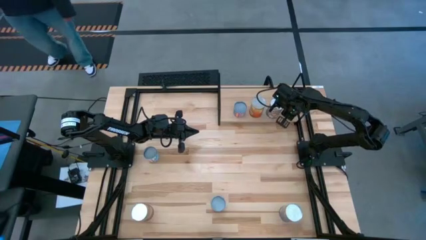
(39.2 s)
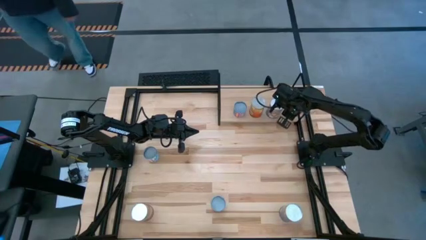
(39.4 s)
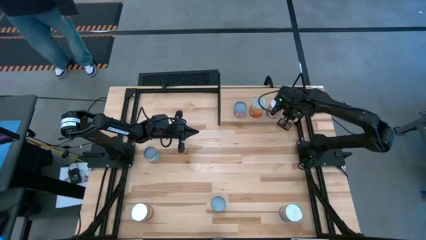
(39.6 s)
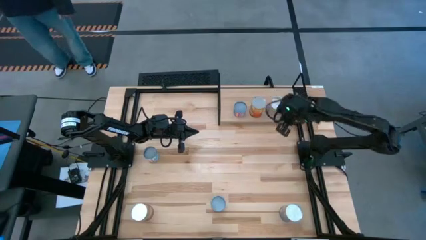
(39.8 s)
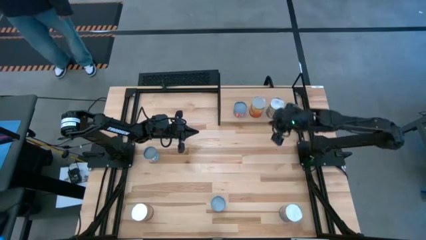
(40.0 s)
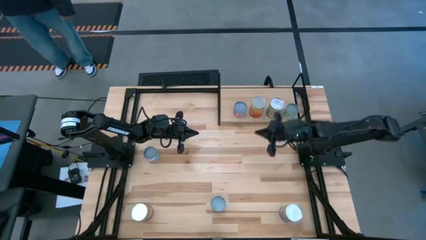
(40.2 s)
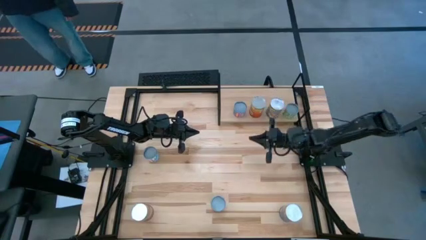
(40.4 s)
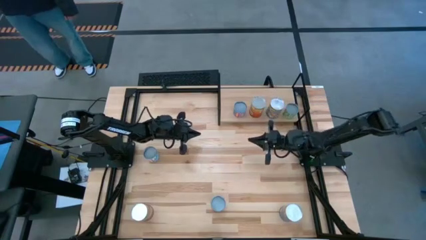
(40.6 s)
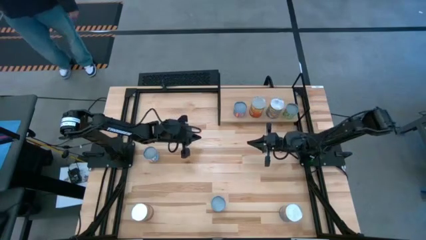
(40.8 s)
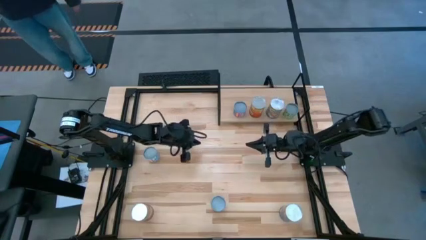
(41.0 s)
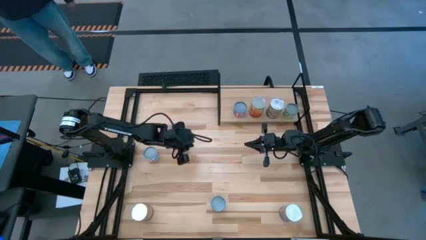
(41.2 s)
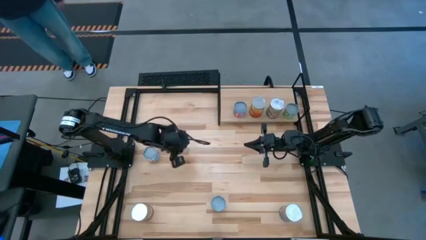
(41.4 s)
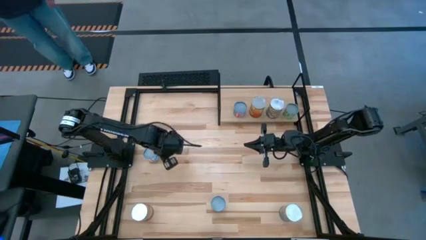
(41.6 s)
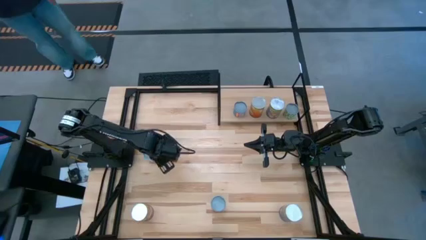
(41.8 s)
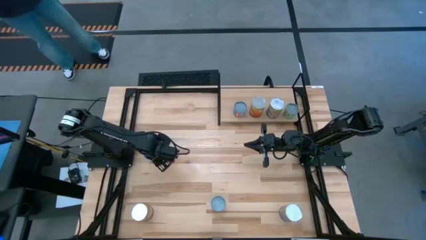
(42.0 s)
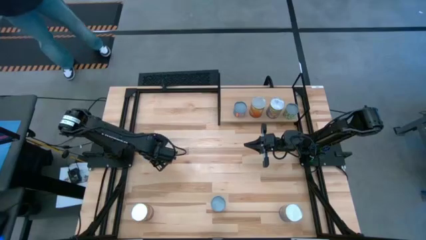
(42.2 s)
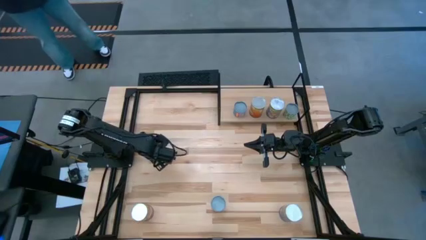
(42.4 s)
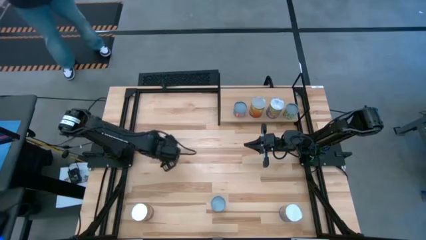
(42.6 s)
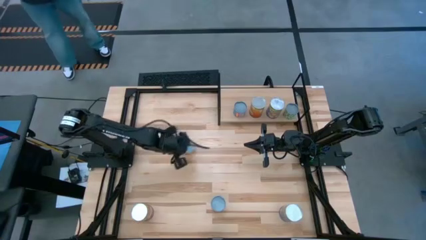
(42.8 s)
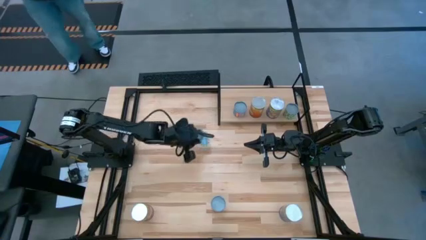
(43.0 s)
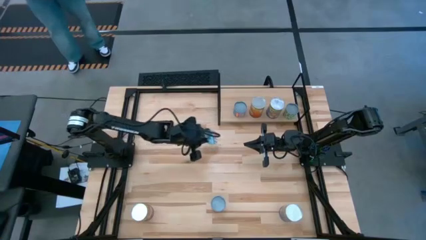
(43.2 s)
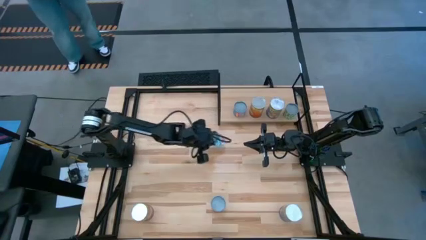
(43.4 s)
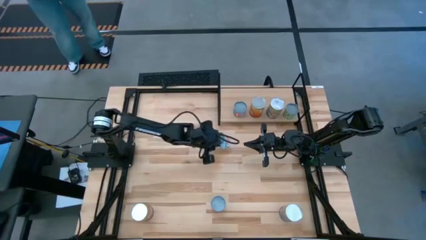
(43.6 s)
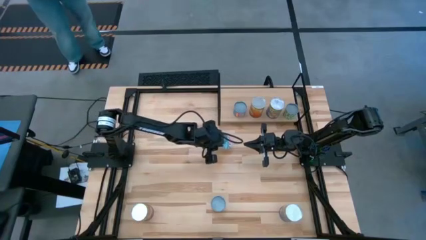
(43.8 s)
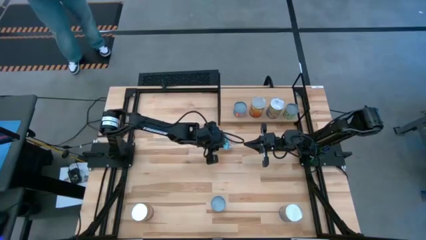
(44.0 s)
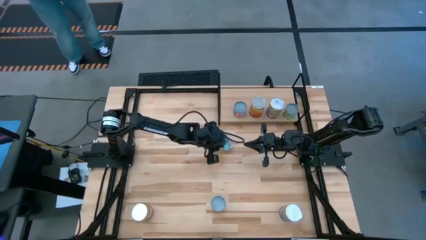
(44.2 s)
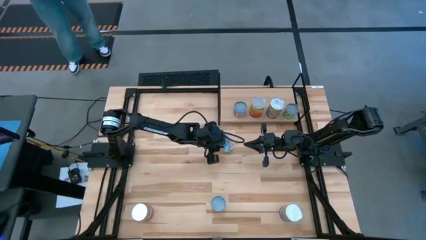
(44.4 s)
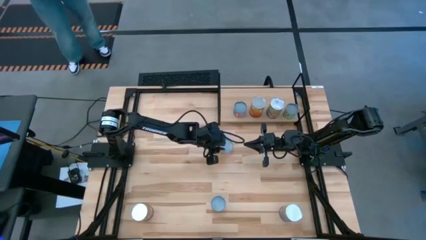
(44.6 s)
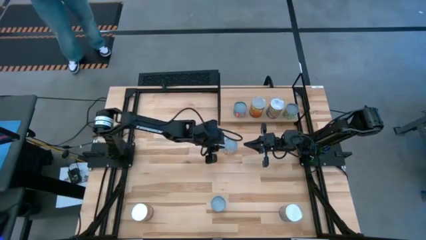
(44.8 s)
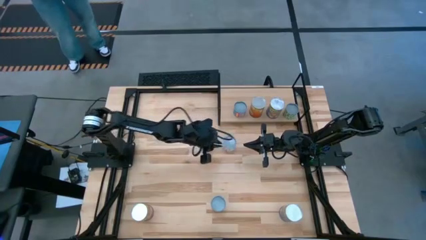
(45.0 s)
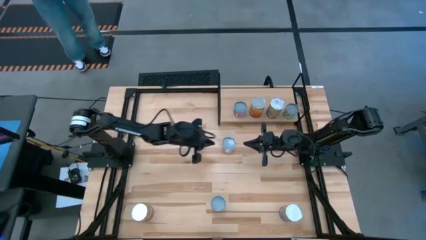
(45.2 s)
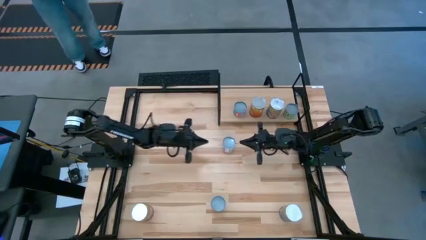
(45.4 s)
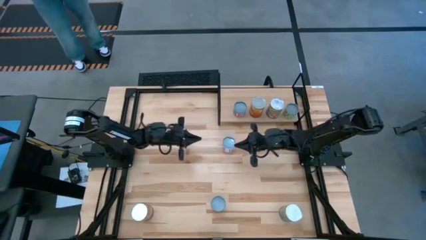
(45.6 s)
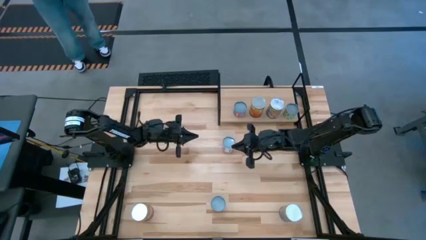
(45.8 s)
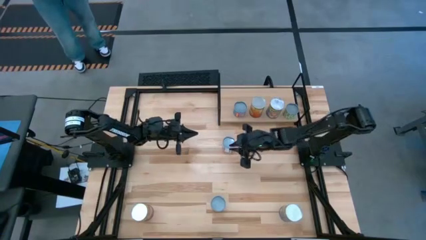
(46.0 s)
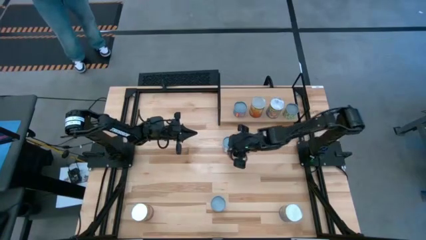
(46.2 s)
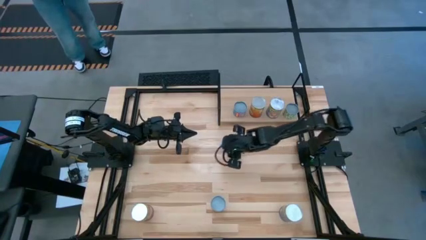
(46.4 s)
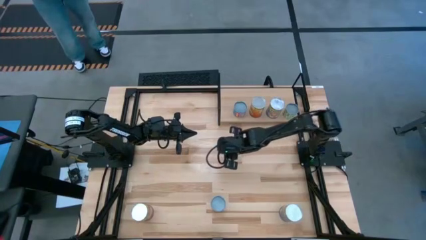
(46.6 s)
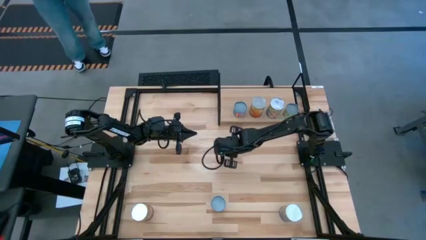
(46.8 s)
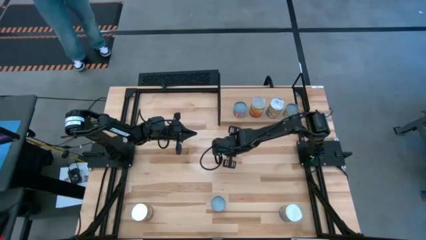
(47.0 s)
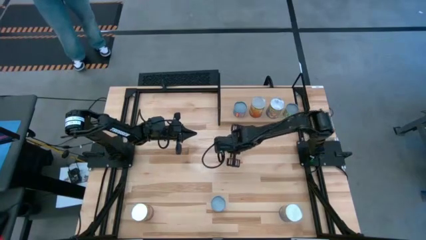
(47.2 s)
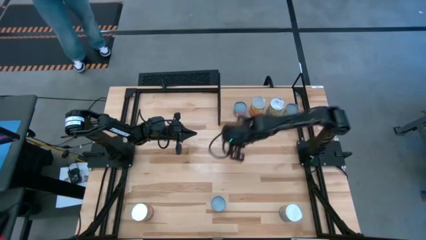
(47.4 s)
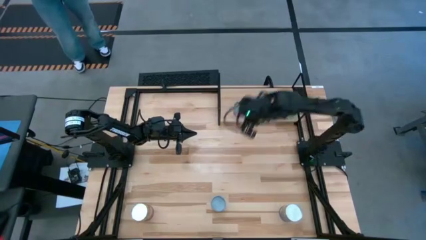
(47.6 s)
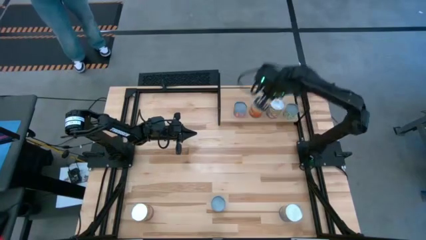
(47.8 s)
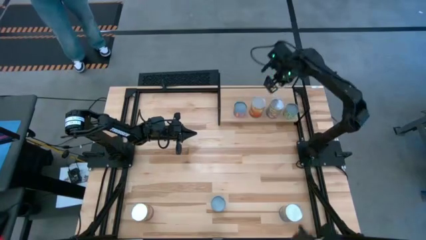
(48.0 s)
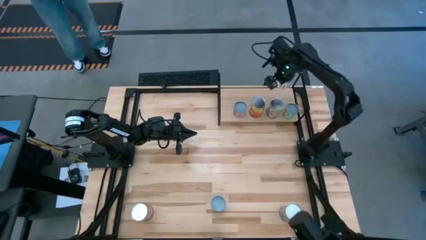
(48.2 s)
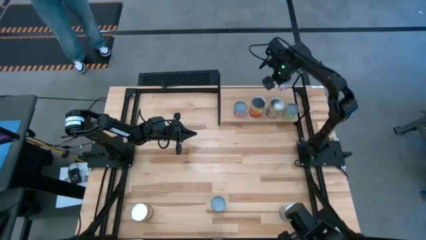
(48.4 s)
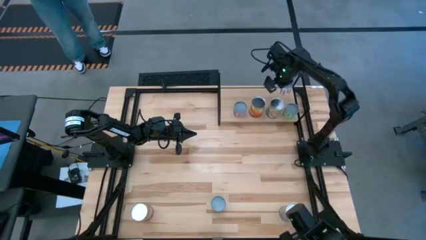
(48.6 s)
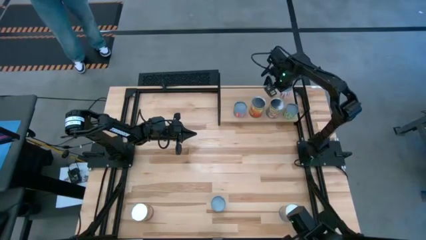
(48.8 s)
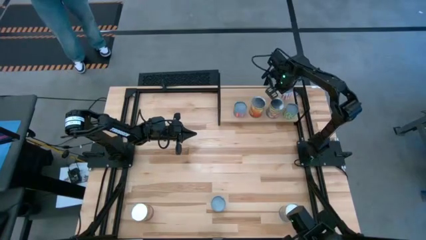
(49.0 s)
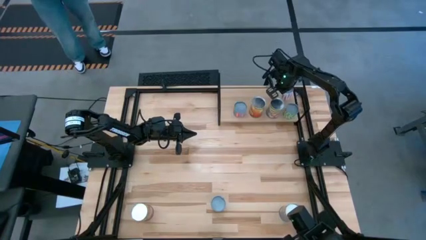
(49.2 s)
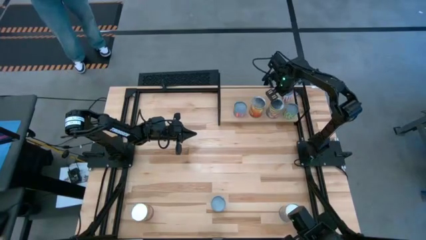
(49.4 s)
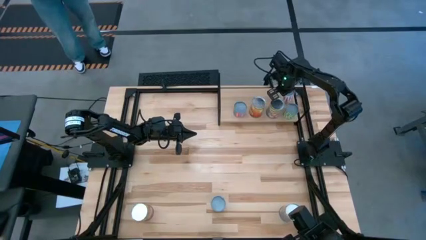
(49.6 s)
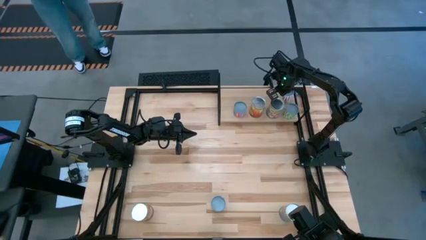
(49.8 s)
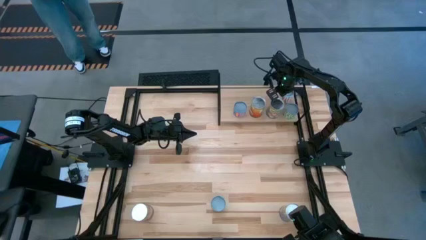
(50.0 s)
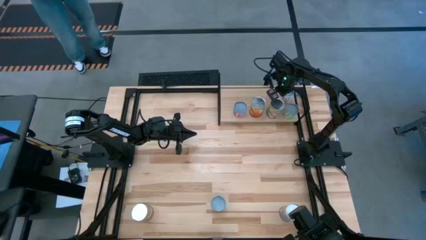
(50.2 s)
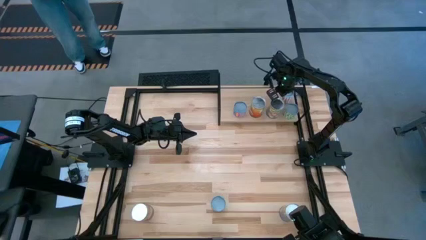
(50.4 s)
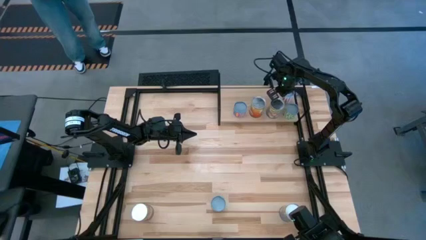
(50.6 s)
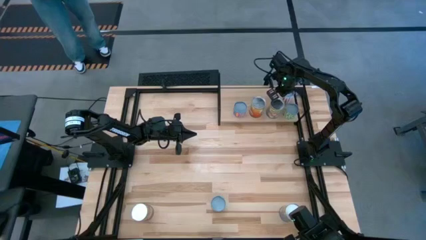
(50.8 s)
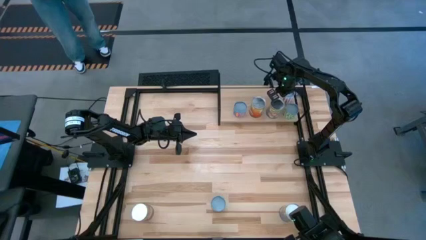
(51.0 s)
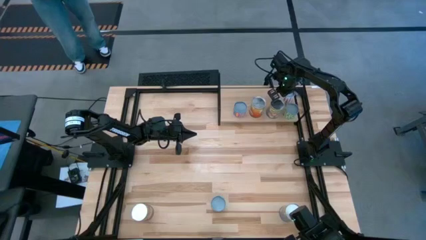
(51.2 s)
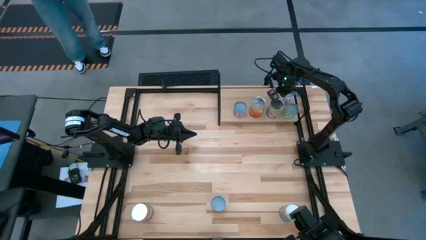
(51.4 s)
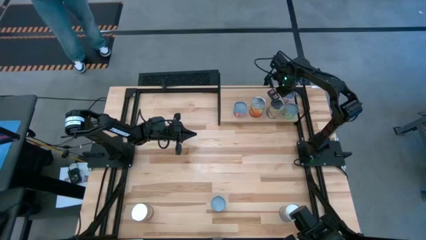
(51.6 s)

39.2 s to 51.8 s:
Task: Pick and place cans onto a shelf
Put the canned carrots on the shelf

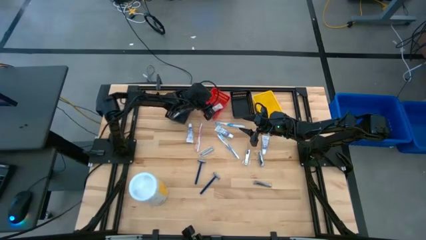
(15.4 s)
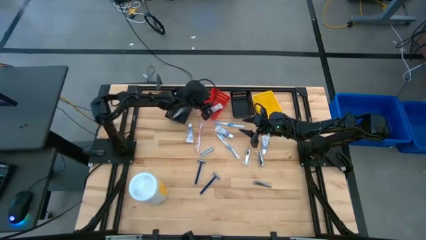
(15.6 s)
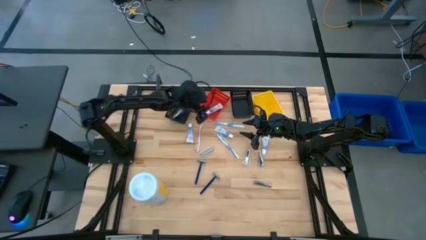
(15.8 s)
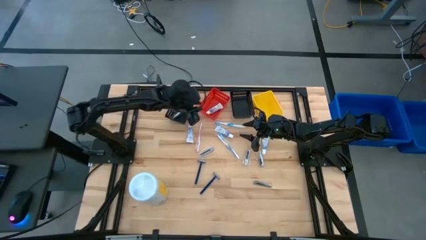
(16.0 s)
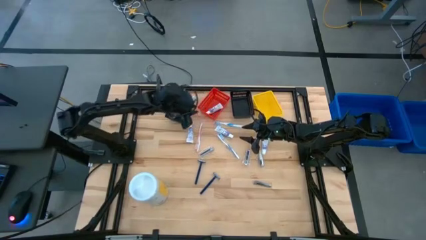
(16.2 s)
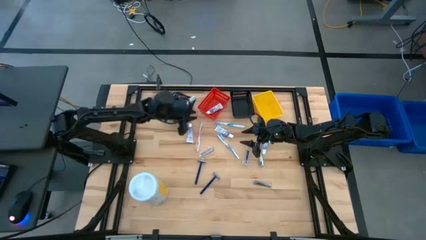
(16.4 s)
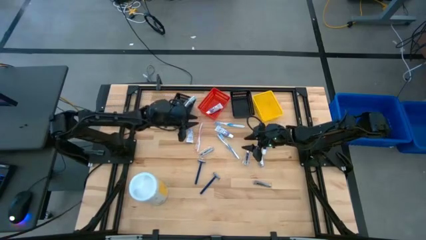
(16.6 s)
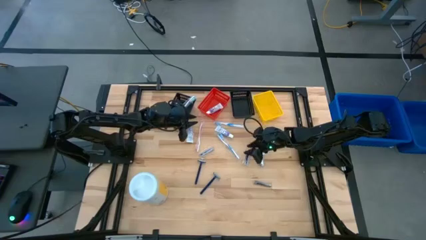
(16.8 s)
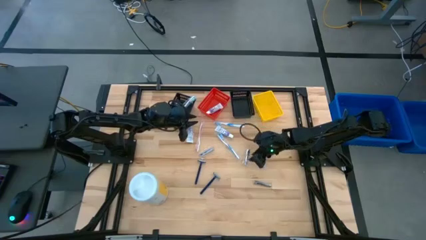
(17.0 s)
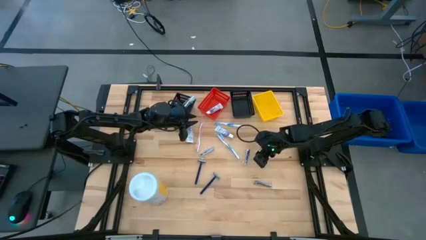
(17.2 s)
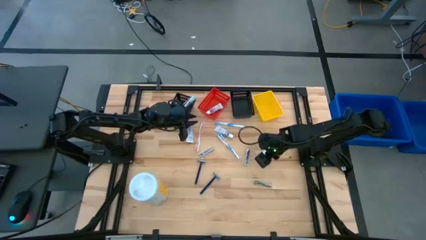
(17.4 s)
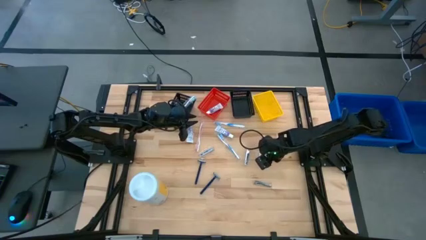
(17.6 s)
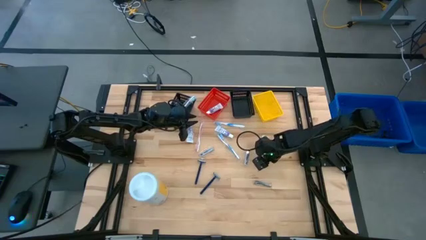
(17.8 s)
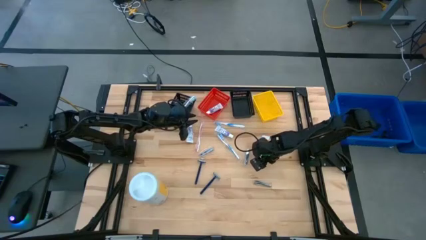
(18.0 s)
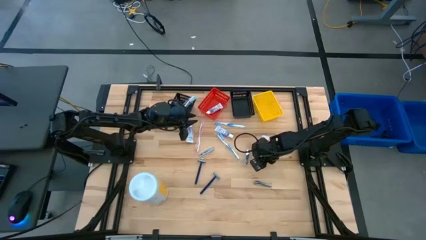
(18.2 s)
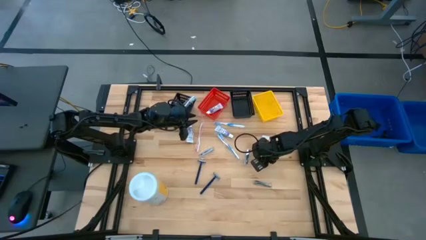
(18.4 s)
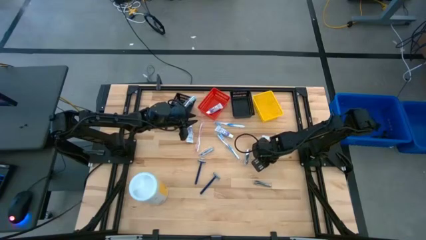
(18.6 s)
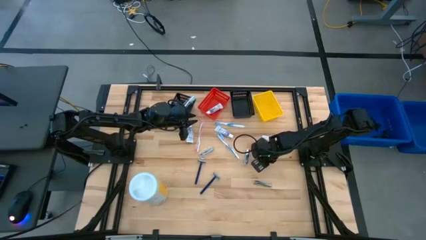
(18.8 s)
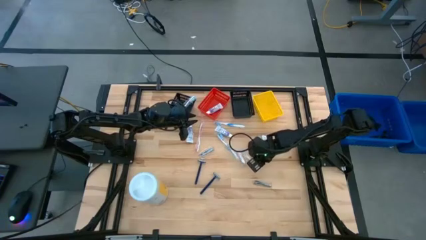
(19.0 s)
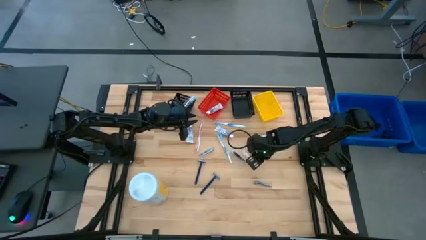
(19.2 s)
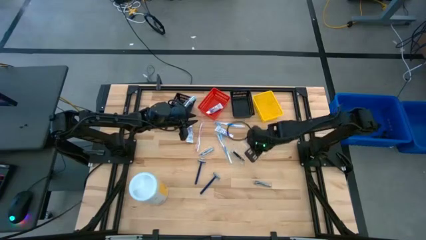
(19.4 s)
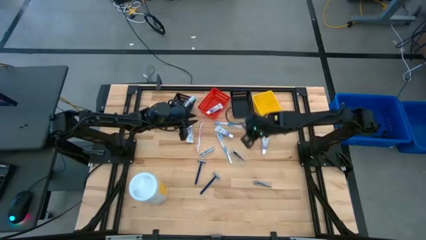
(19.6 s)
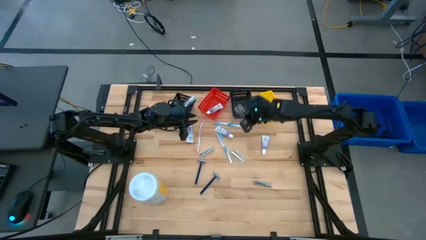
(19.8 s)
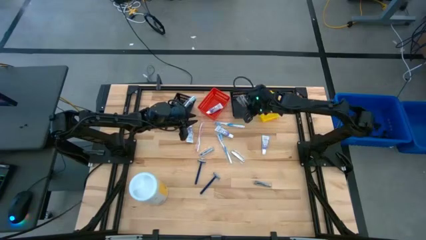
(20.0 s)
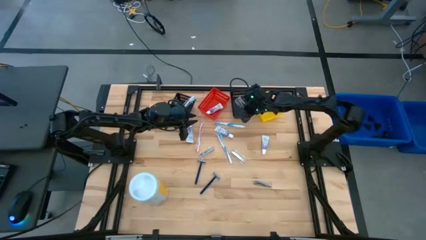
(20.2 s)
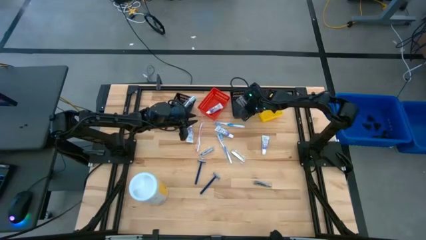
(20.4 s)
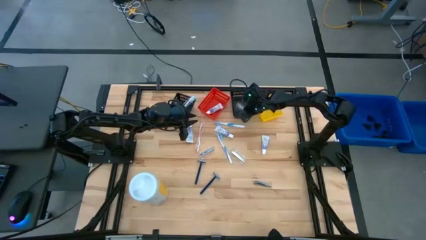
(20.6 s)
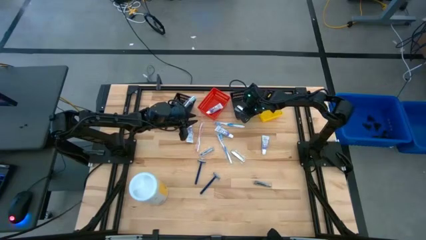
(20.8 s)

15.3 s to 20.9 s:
Task: Pick & Place Travel size toiletries
Put the nail cutter into the right black bin
